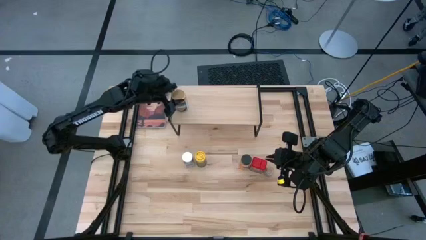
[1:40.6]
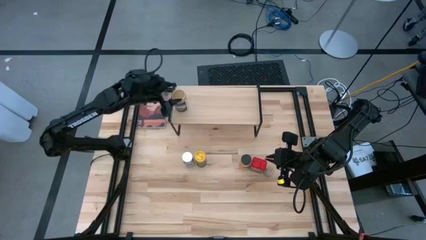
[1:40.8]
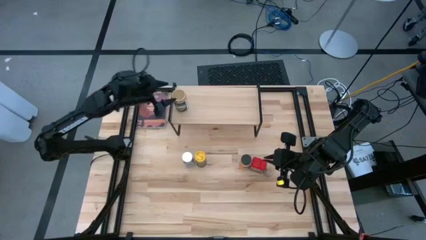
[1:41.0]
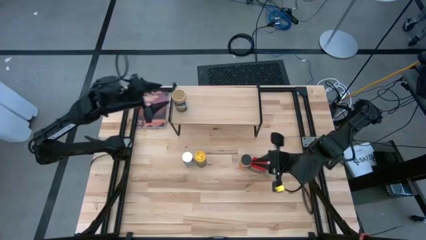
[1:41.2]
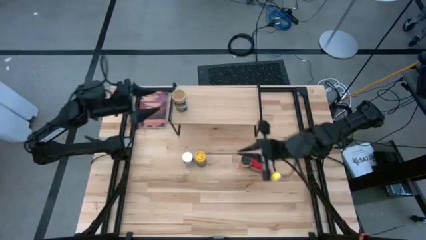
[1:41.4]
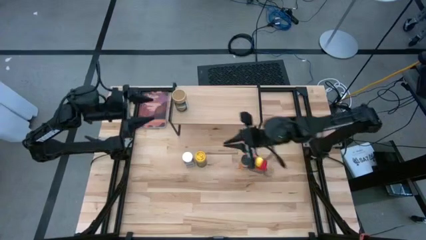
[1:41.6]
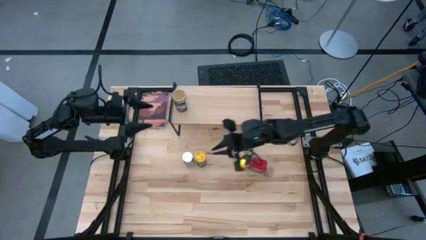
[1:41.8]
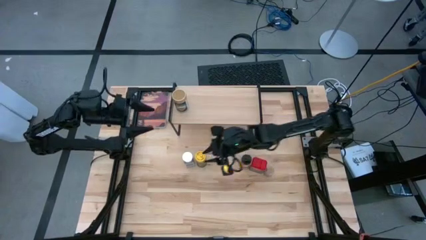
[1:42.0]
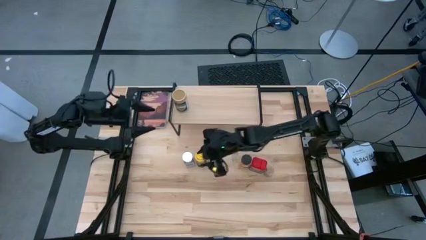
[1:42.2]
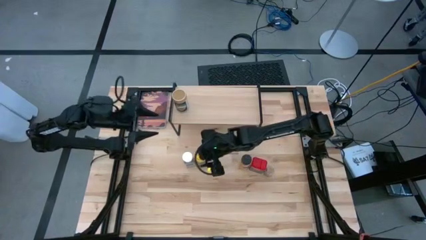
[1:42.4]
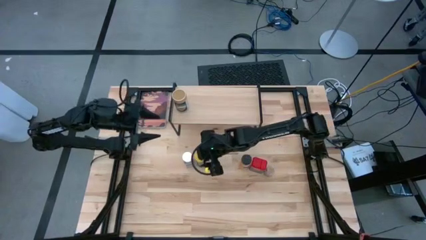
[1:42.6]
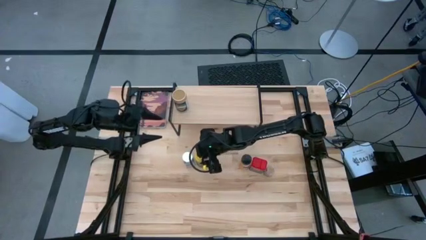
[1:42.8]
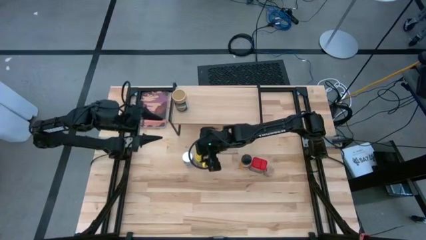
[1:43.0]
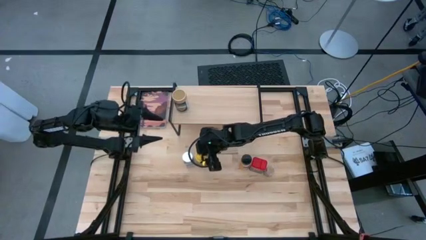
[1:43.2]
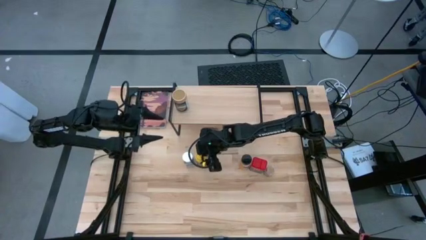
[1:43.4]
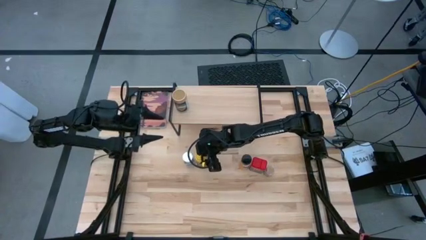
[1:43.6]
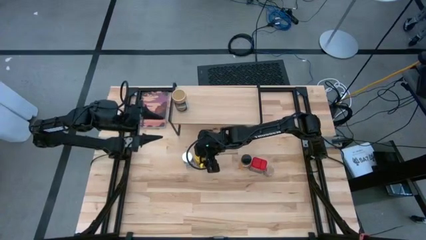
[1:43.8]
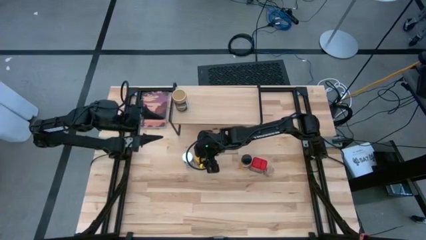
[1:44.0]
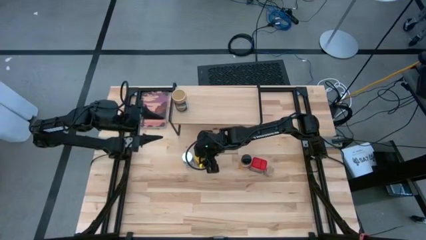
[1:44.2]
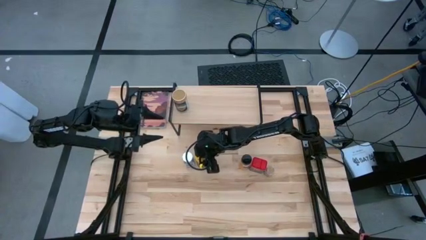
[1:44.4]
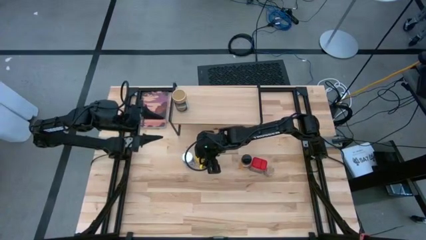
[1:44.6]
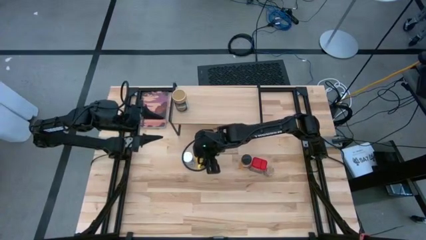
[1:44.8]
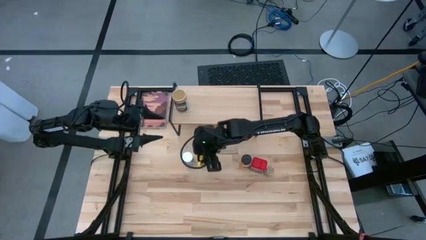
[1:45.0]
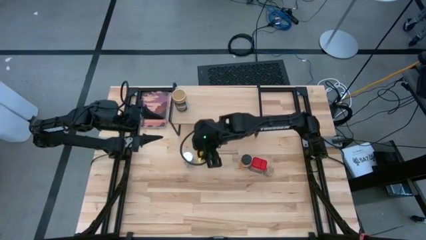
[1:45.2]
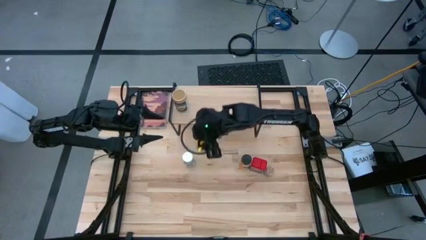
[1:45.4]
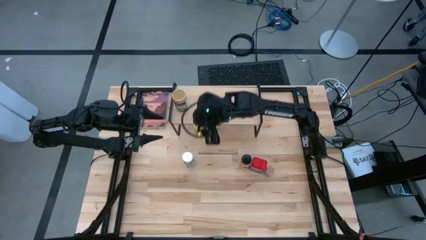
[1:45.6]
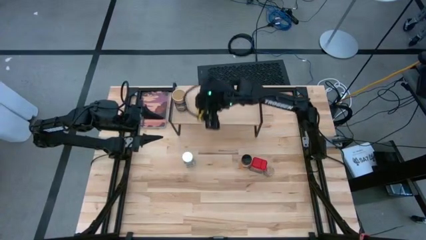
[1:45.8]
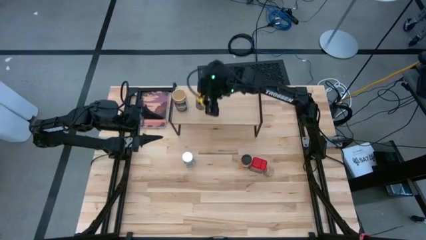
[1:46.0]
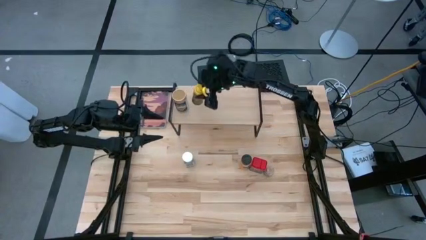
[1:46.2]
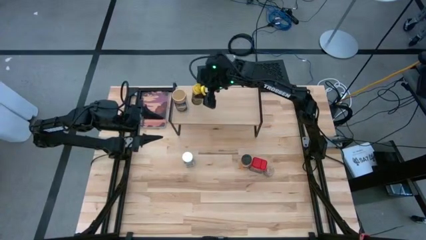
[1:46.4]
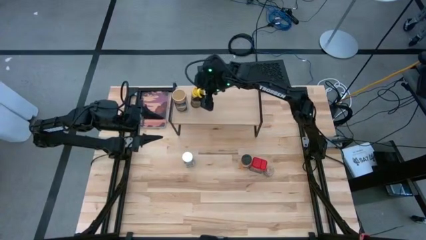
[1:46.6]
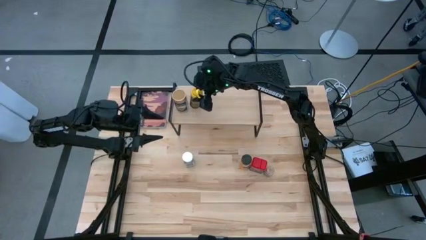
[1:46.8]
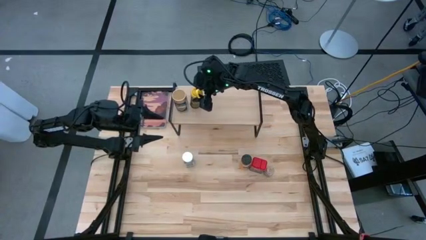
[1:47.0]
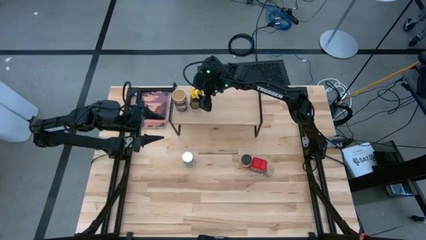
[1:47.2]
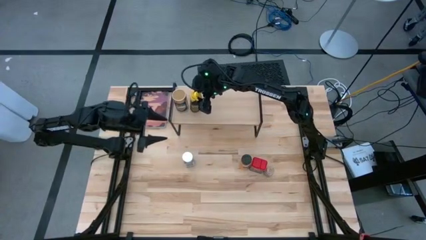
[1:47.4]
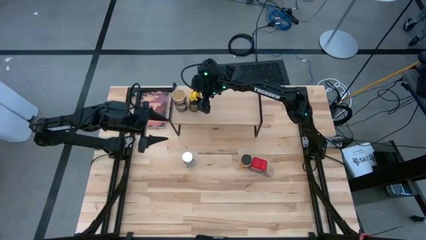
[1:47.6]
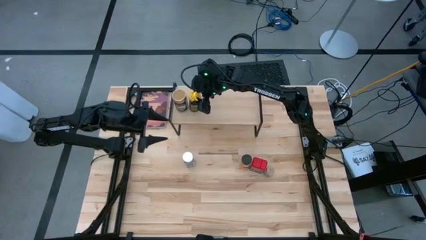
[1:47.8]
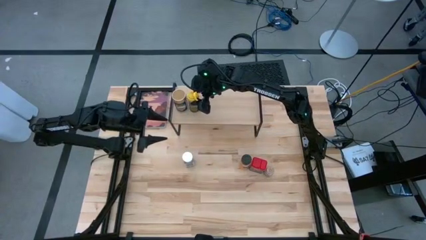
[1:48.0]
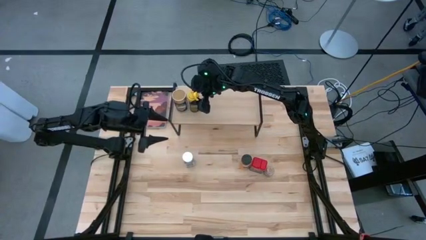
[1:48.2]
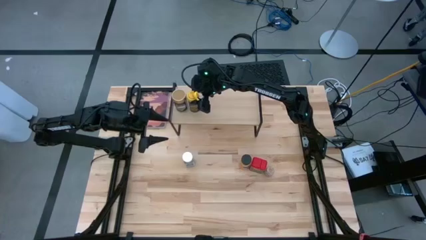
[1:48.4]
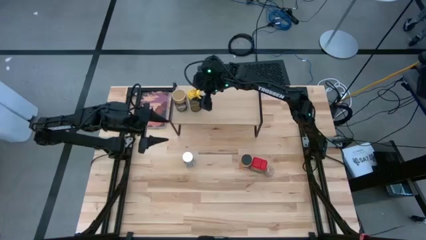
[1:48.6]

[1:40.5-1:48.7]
Task: Shelf spices
Put the yellow seasoning bottle on the shelf

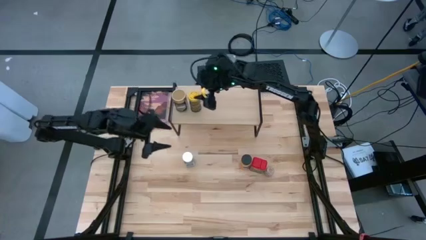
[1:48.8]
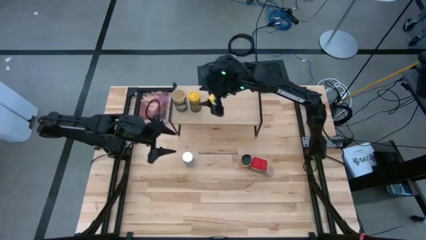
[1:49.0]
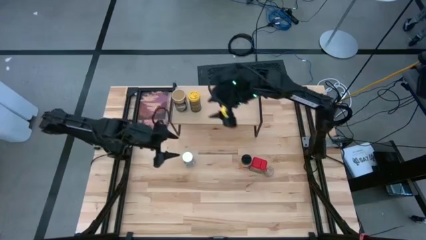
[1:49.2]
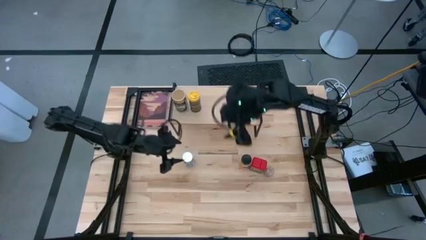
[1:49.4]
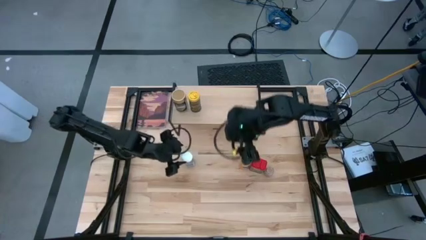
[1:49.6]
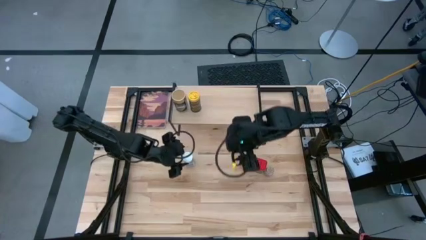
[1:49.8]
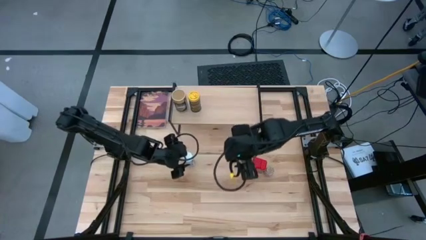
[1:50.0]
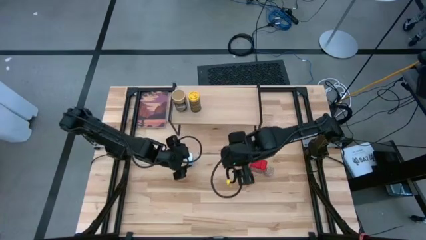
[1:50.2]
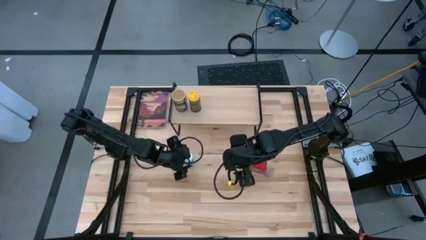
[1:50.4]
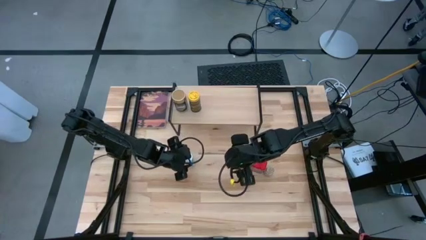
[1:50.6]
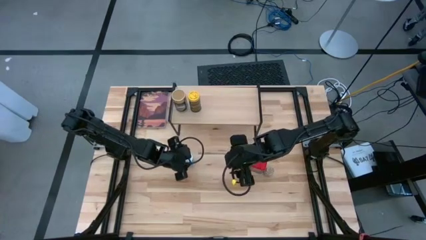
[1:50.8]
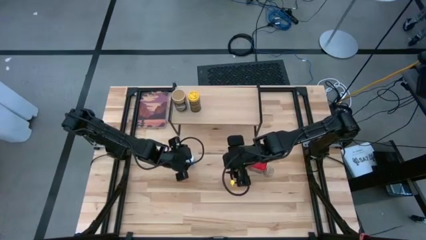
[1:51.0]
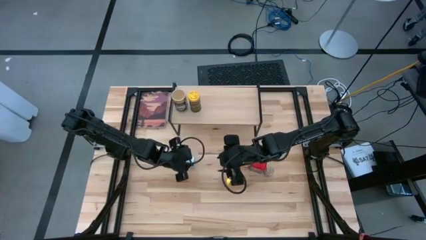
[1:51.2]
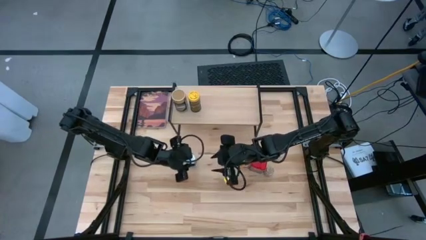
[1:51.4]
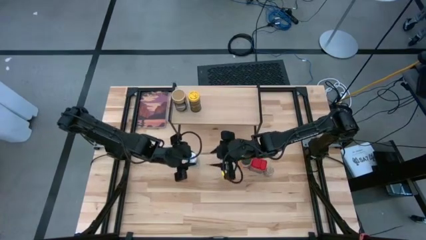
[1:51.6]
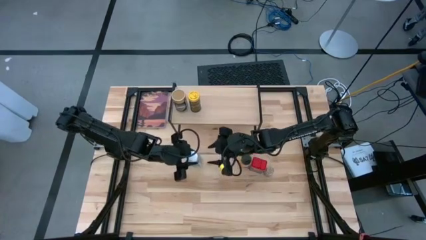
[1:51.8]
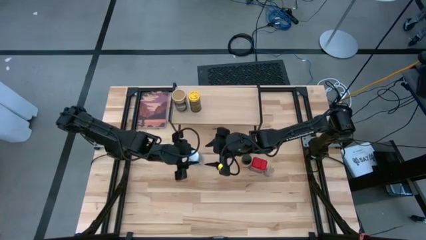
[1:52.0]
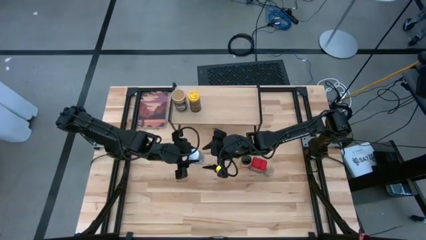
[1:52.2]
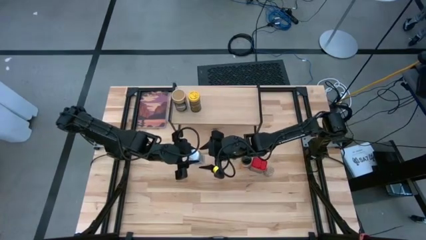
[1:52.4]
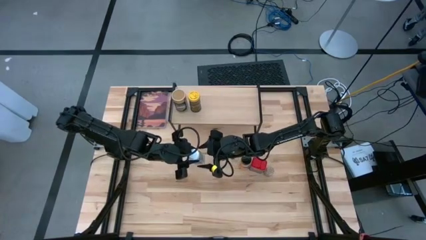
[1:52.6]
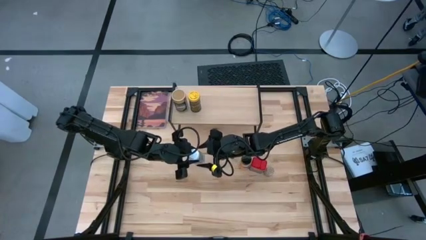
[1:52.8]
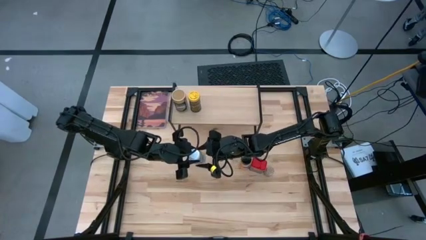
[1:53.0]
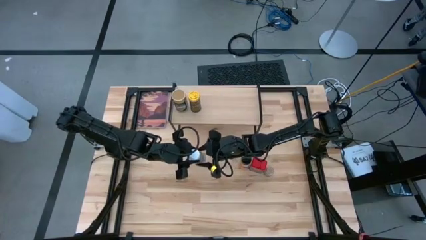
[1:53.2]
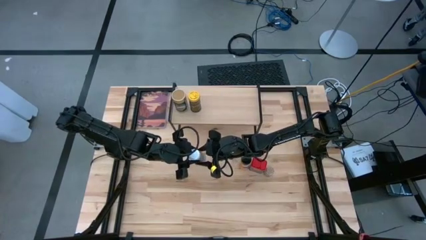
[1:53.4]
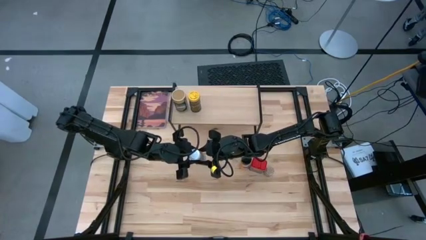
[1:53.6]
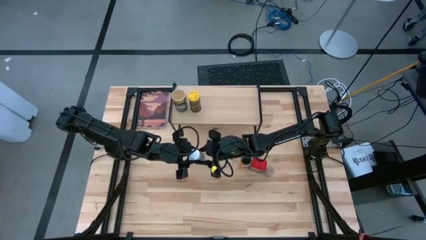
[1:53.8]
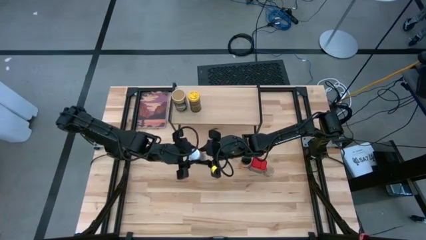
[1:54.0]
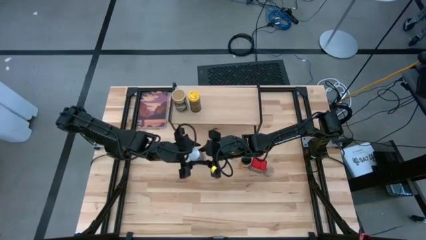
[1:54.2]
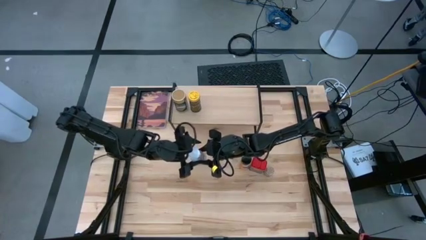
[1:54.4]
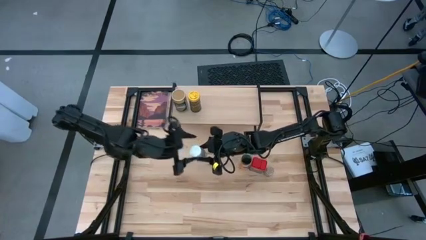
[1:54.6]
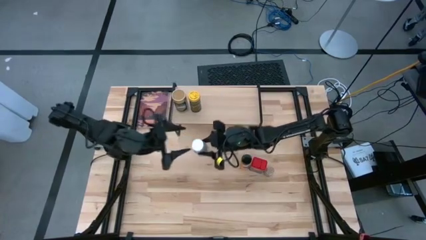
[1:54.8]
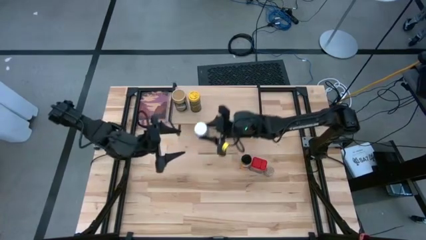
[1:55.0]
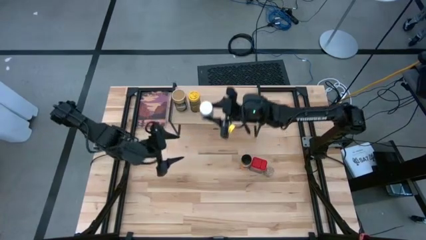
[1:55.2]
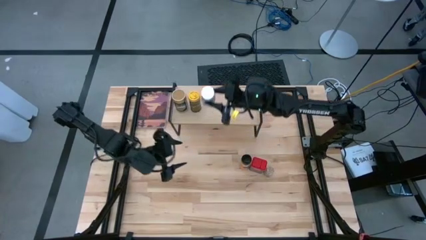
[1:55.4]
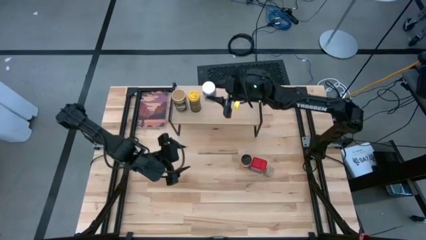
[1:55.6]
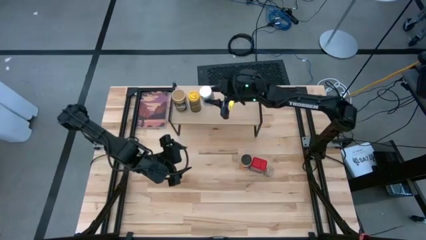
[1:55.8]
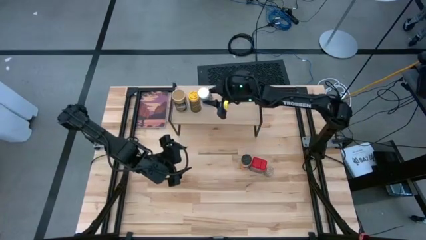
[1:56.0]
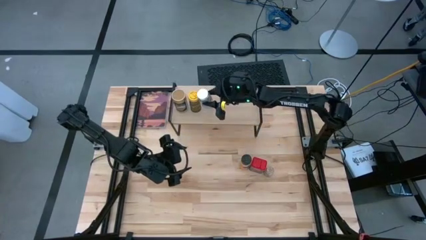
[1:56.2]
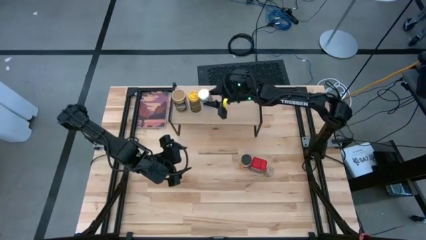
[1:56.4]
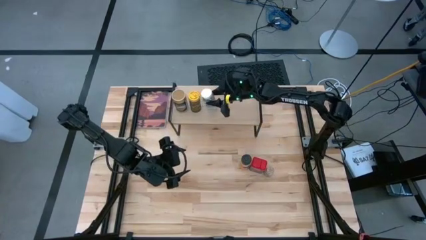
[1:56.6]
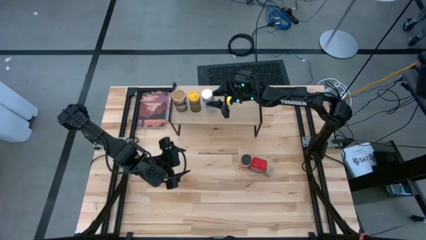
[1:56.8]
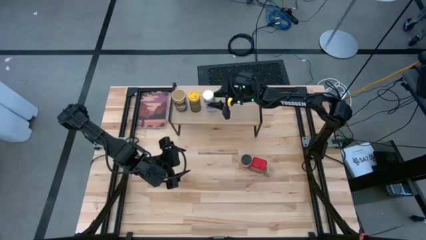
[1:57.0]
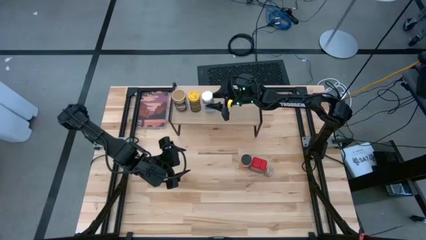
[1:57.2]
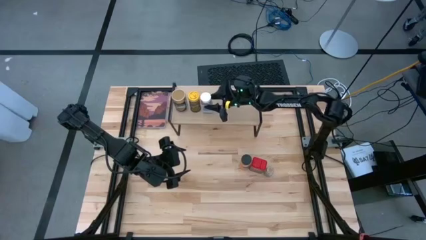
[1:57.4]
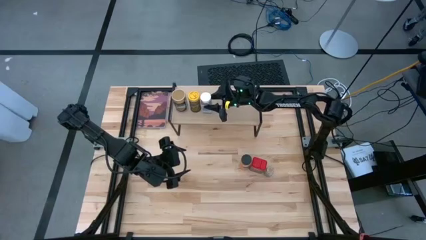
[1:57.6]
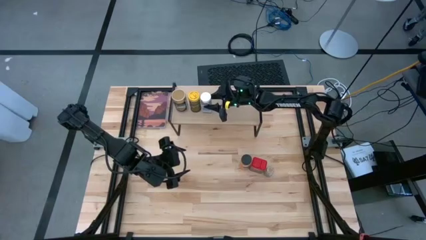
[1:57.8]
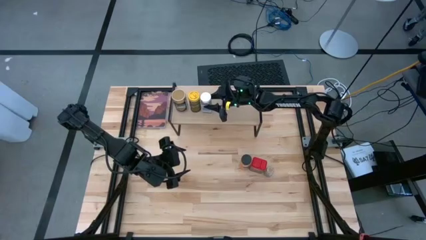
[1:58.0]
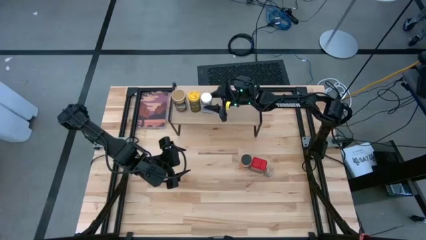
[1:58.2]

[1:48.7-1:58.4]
Put the white seasoning bottle on the shelf
